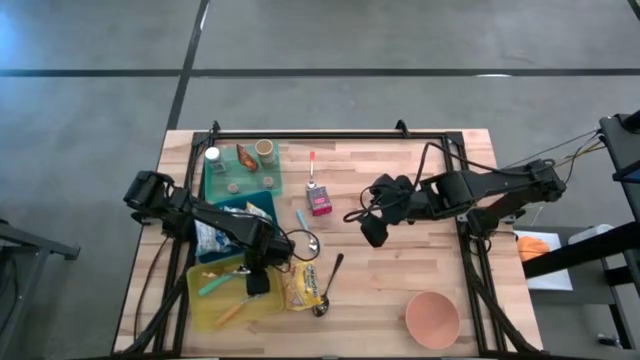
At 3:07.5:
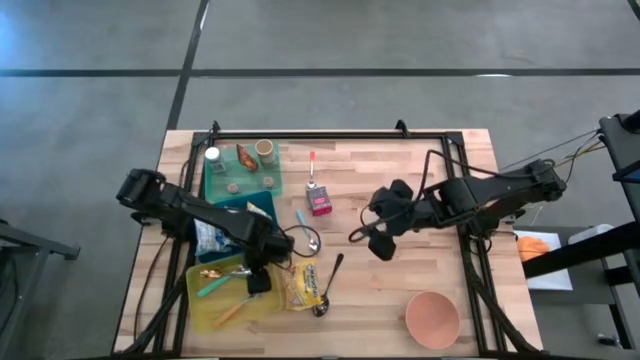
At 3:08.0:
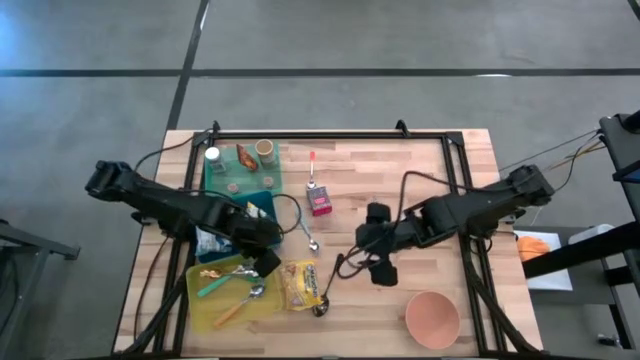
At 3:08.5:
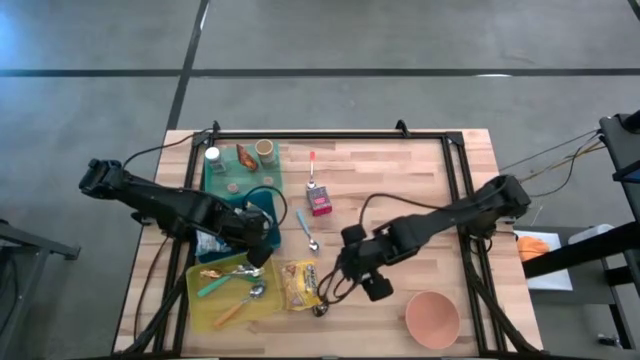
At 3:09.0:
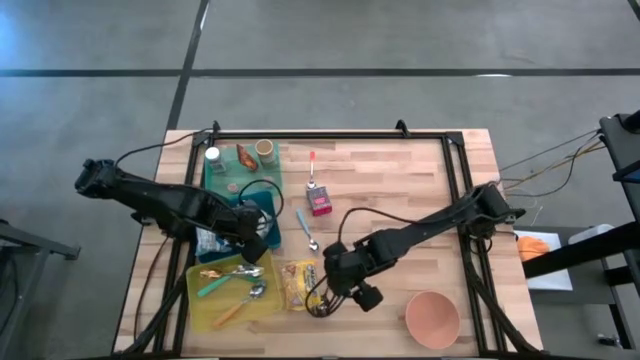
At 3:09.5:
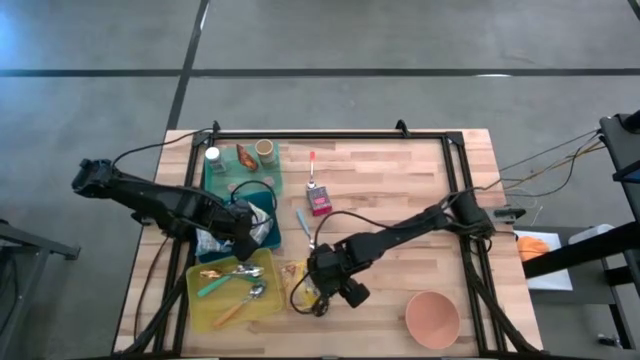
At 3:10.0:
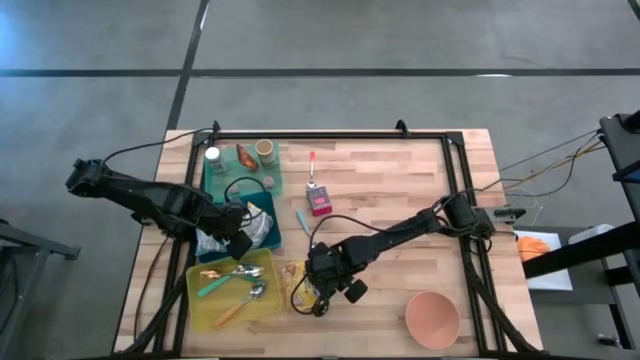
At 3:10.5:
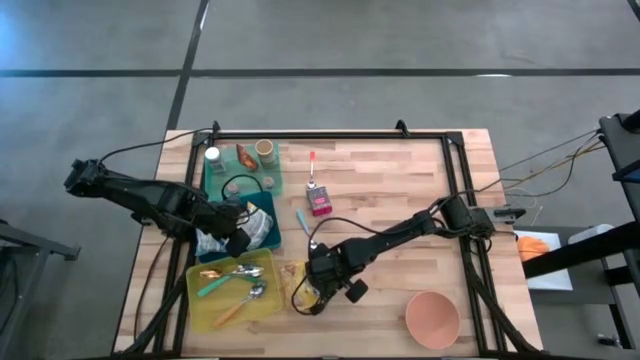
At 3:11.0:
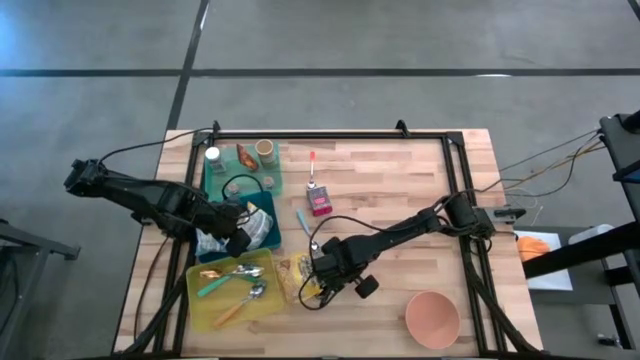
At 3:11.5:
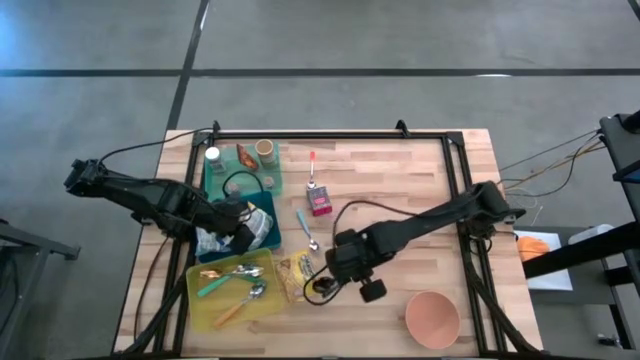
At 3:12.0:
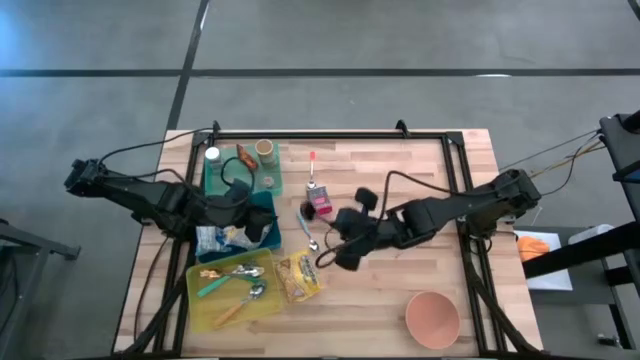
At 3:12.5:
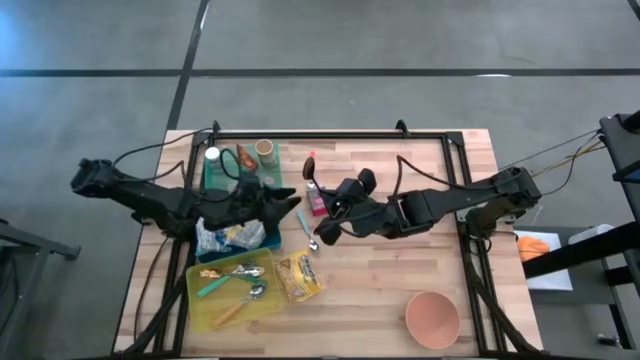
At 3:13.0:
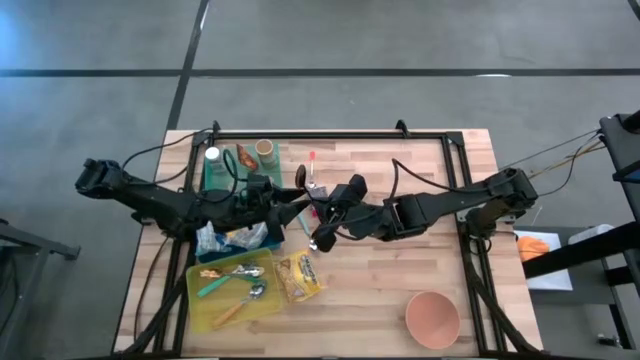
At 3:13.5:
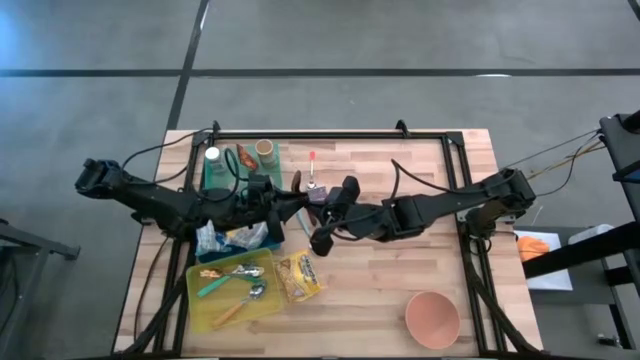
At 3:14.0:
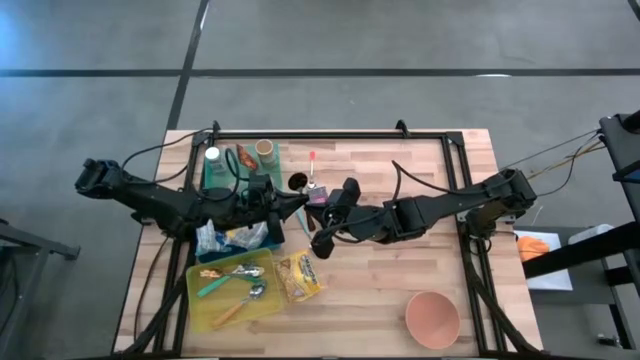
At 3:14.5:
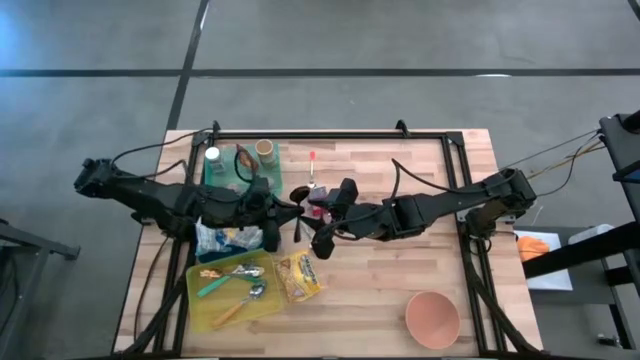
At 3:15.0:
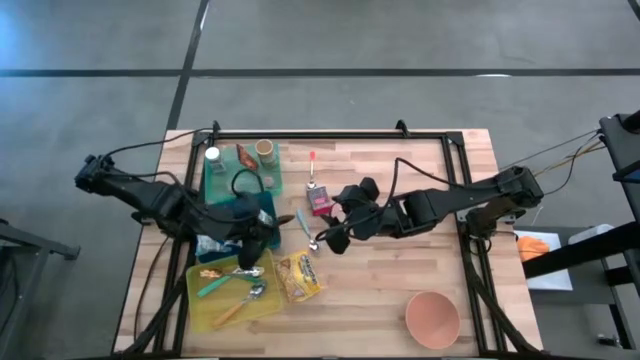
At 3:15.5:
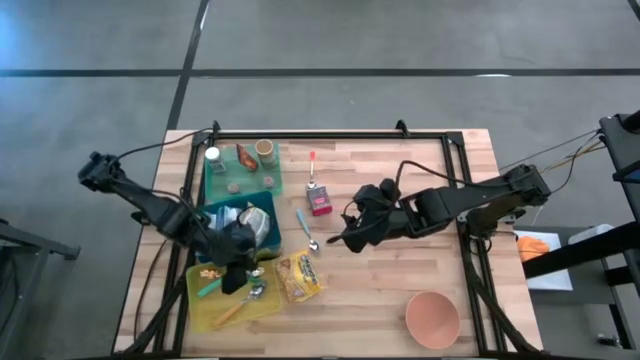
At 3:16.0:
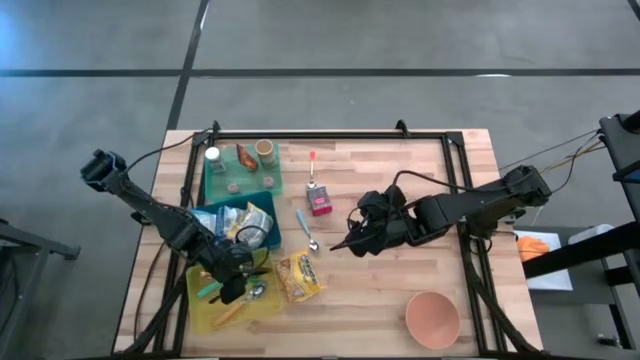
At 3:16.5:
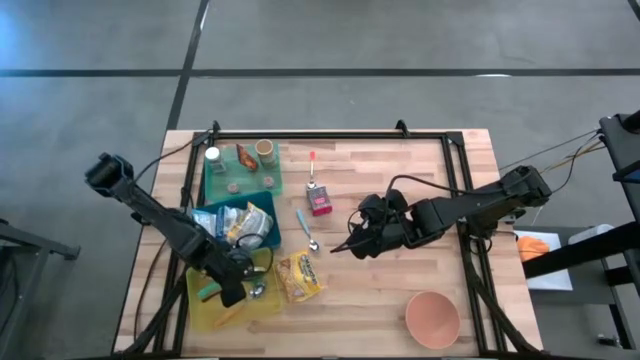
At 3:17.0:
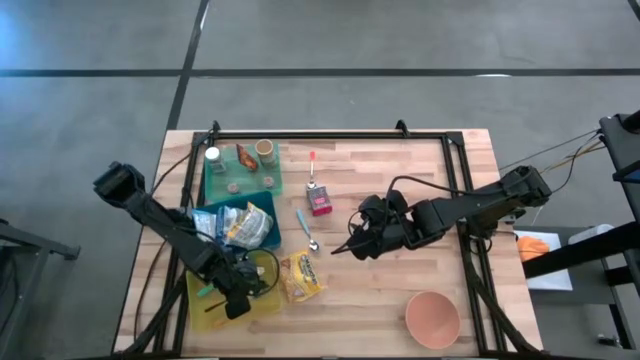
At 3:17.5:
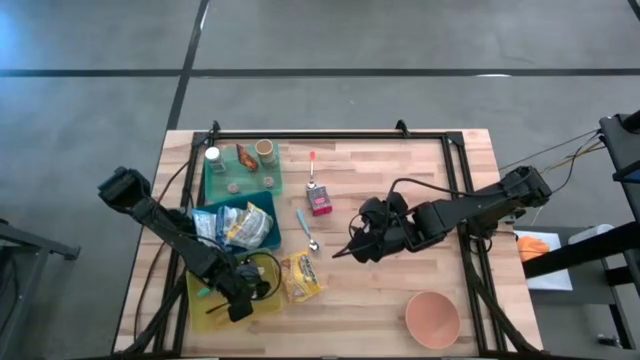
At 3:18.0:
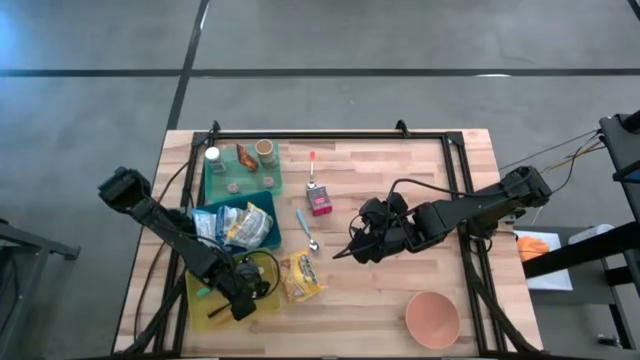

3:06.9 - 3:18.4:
Put the black spoon into the yellow bin

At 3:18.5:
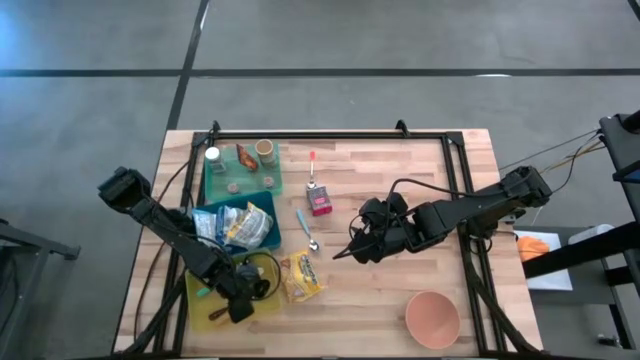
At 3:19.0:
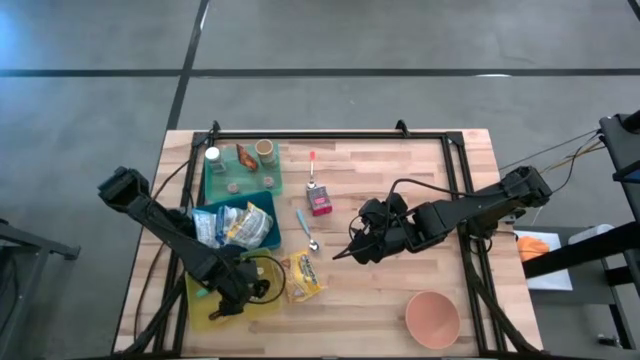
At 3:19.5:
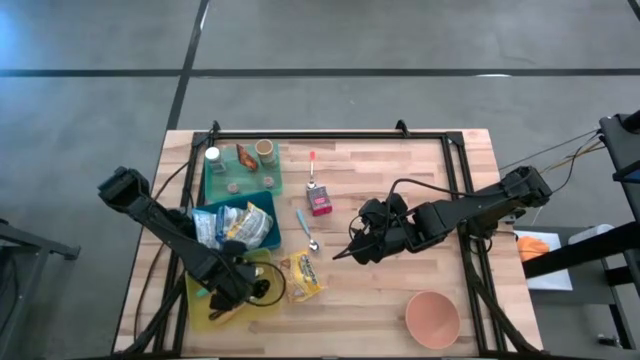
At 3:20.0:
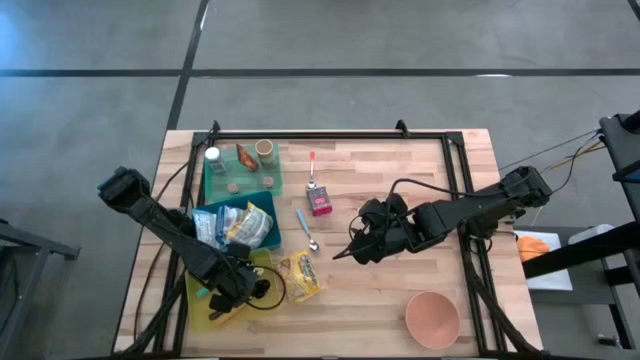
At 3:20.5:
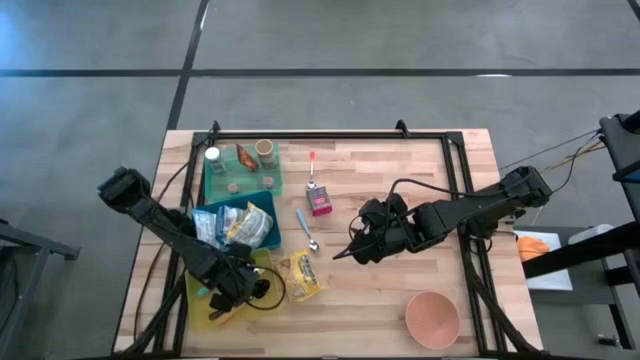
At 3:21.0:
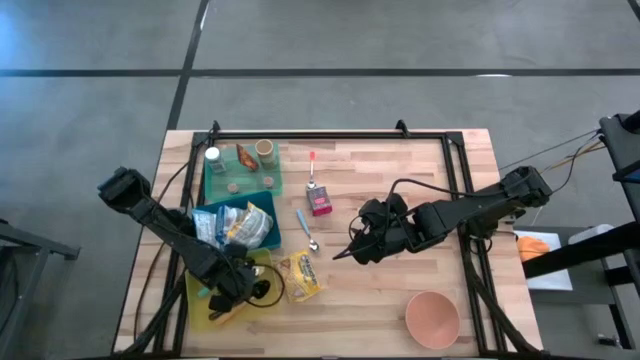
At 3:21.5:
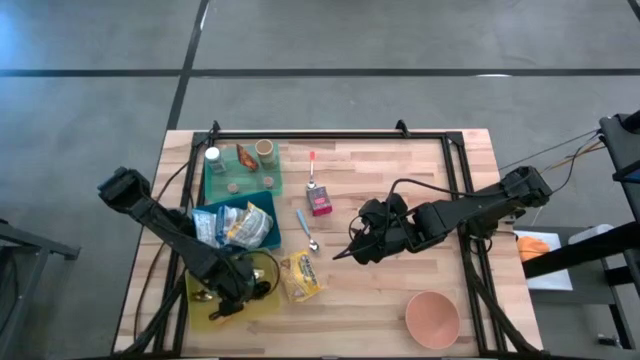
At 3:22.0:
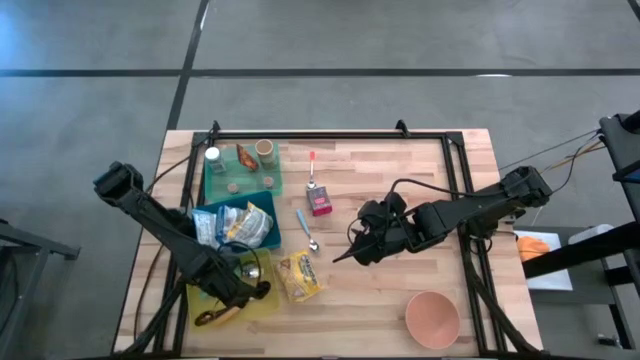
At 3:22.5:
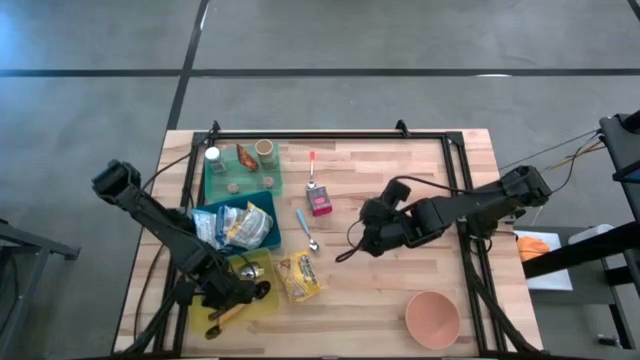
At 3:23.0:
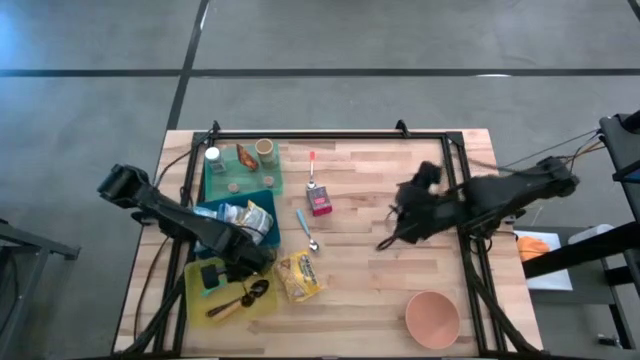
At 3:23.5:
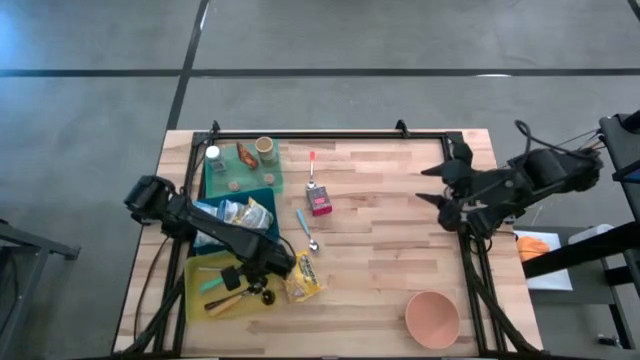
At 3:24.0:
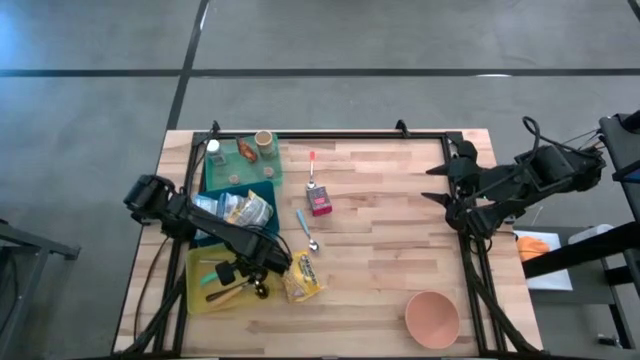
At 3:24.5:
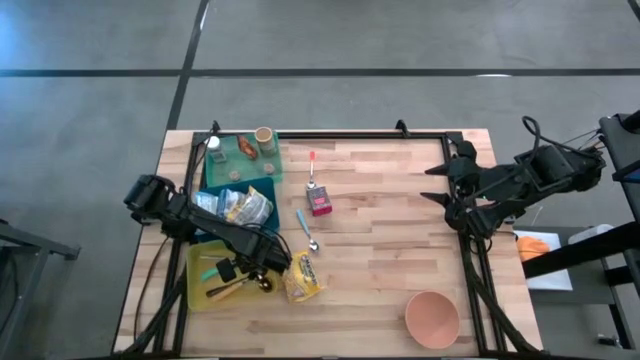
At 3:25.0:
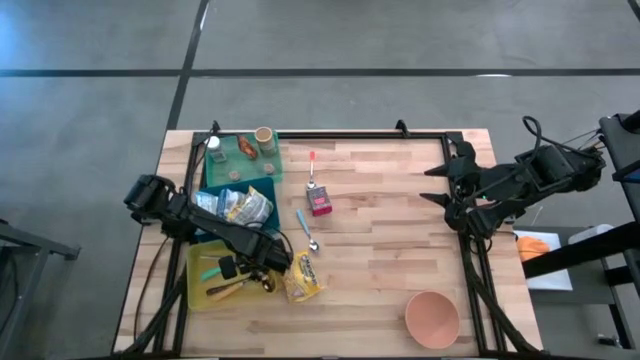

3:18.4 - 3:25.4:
Adjust the green spoon in the yellow bin

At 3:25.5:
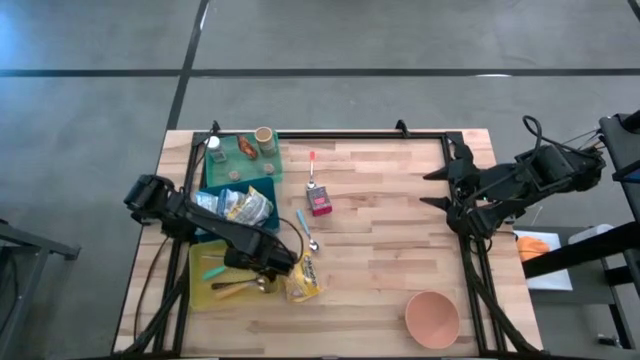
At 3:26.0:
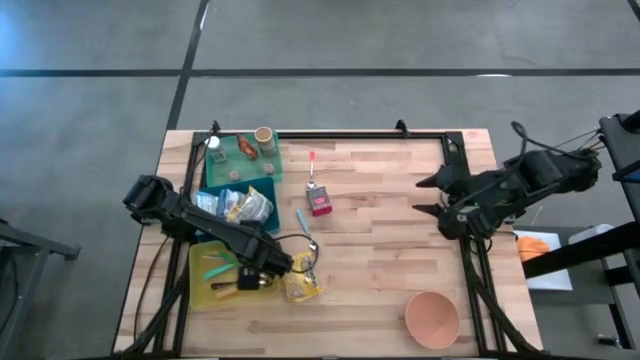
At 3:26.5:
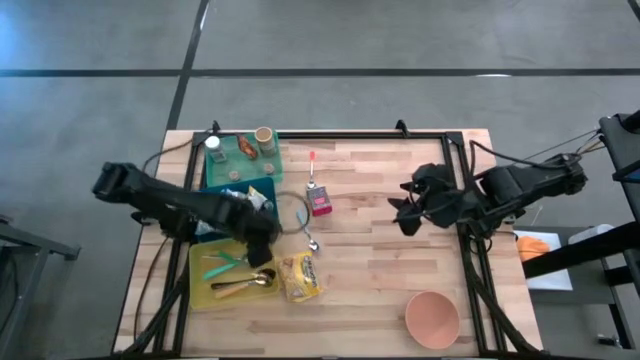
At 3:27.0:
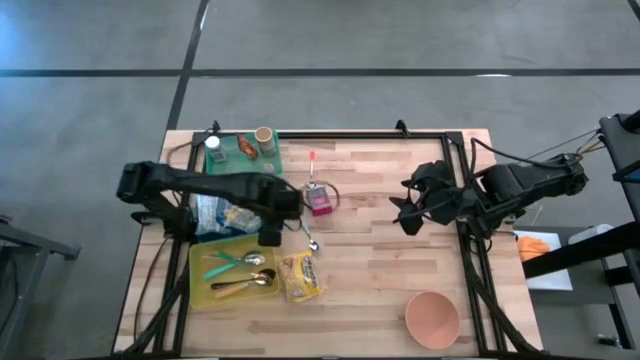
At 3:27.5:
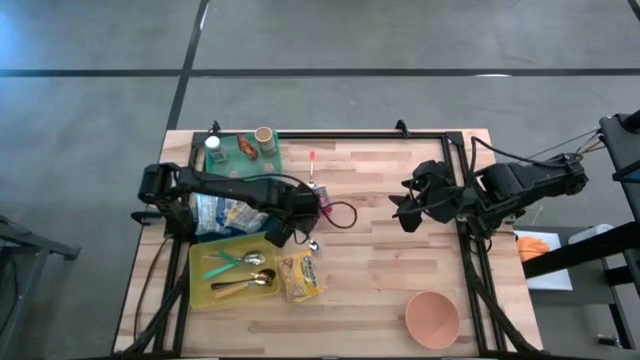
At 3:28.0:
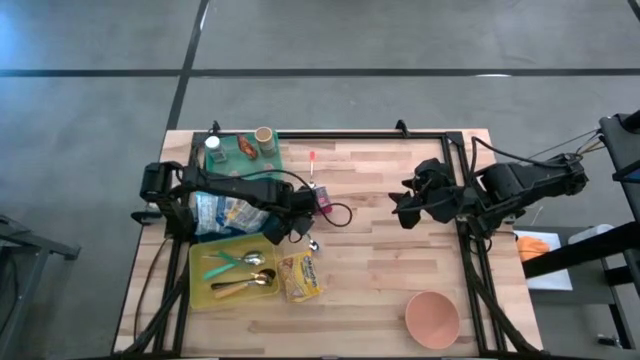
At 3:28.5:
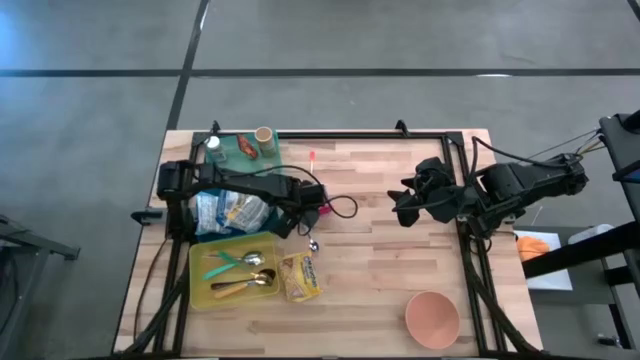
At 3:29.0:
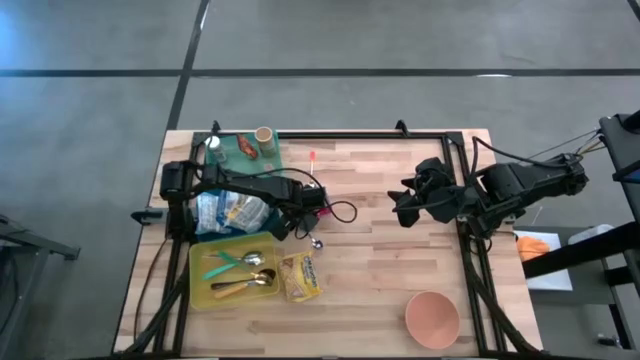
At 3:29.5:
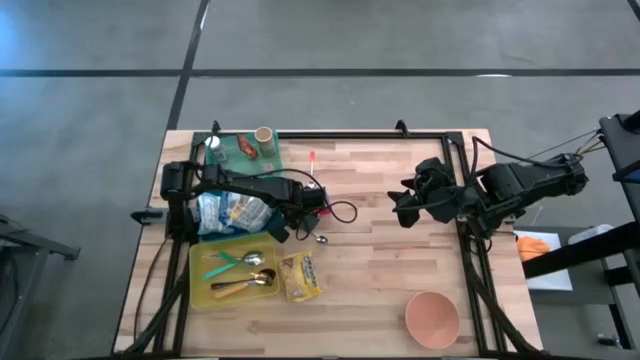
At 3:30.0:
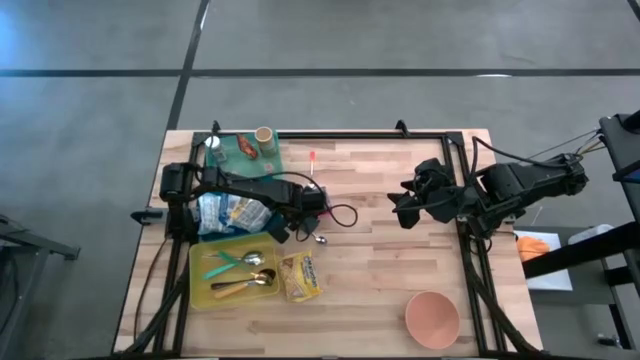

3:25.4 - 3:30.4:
Put the light blue spoon into the yellow bin
